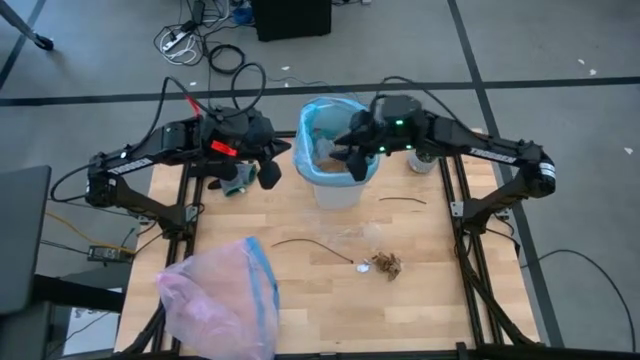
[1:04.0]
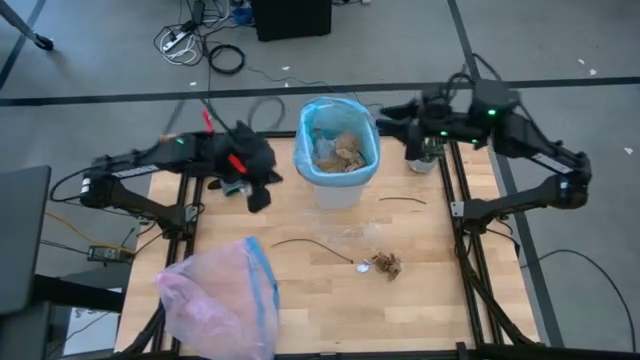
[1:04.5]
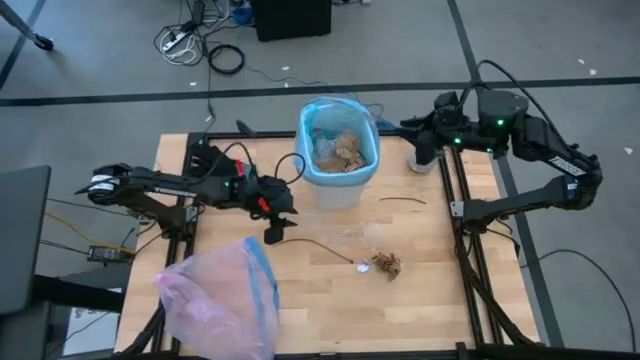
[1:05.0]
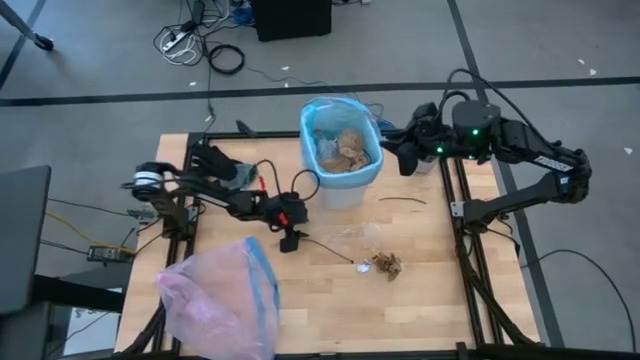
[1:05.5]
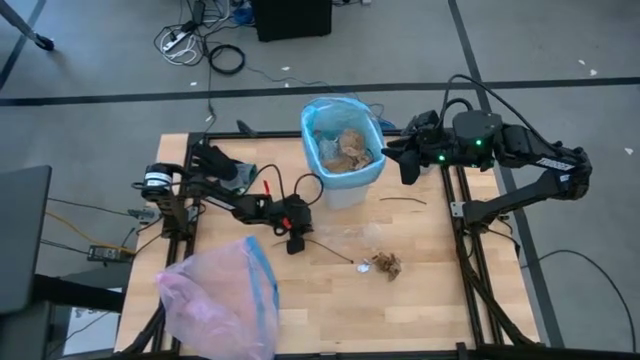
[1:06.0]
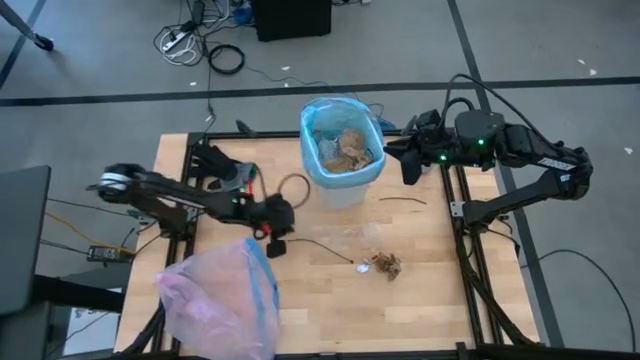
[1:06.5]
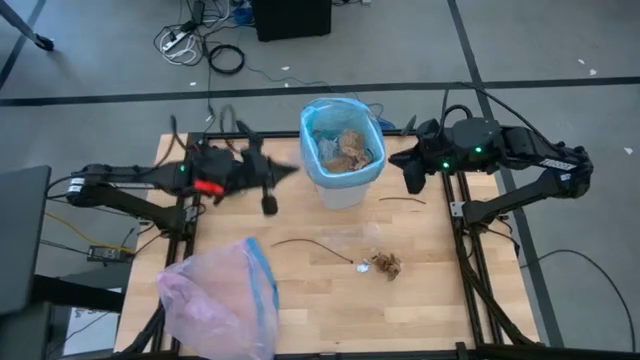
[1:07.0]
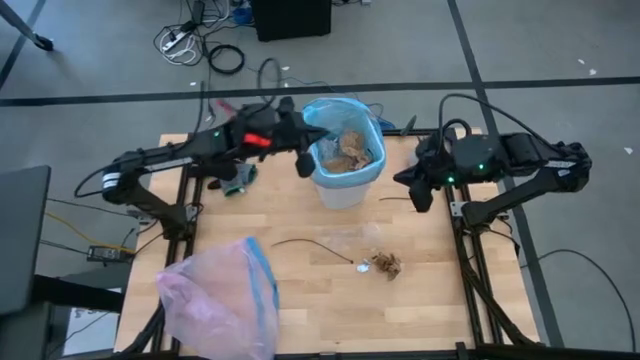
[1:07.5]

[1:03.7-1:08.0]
Task: place trash/remove bag and relplace
Put the transparent plastic into the trash bin

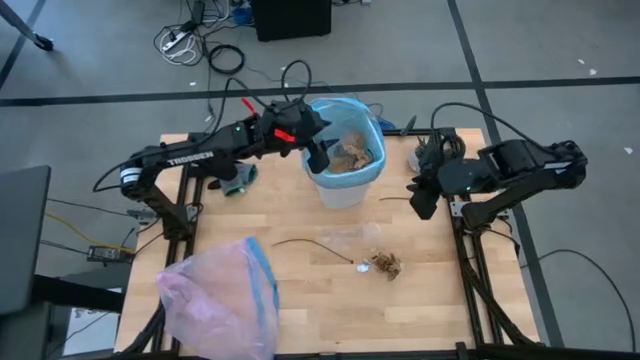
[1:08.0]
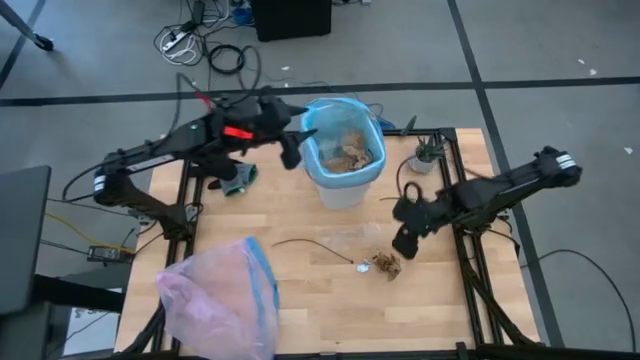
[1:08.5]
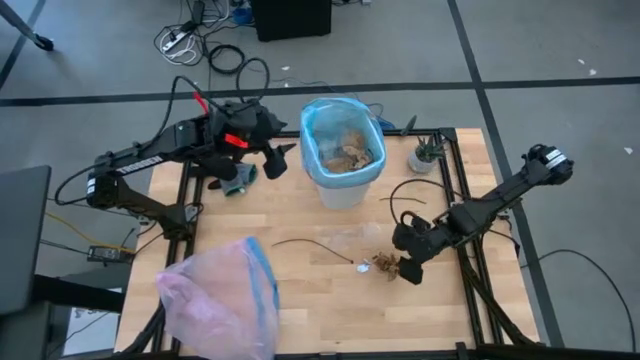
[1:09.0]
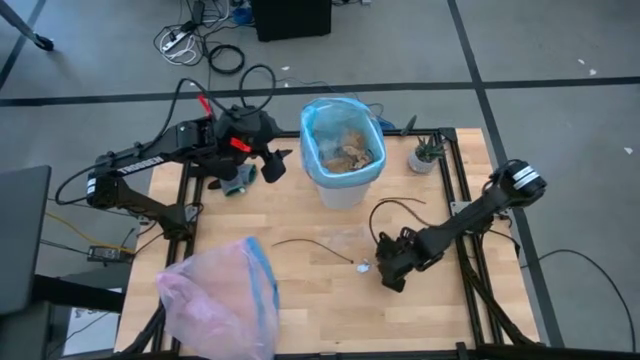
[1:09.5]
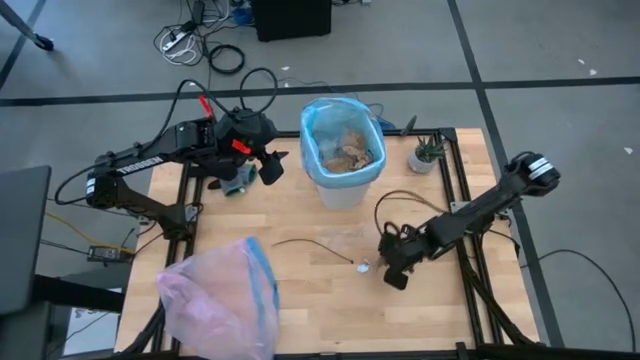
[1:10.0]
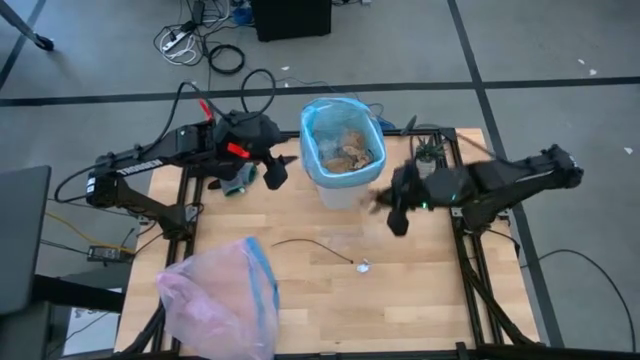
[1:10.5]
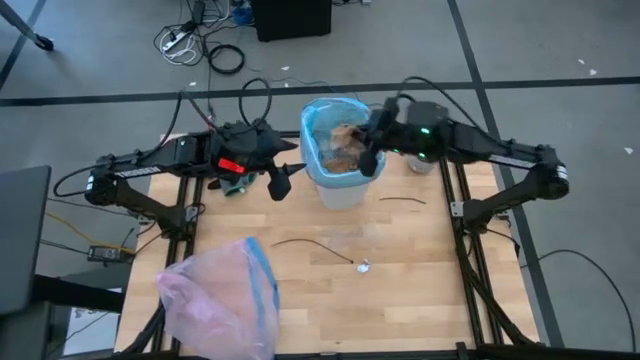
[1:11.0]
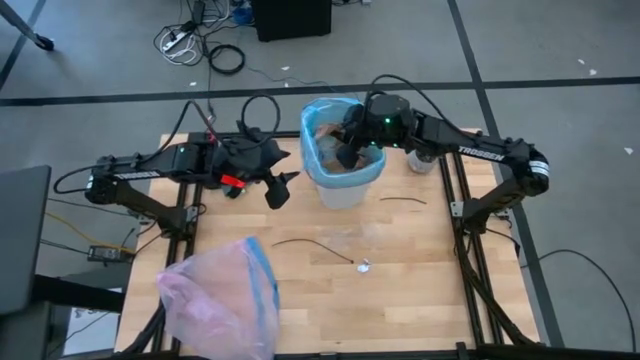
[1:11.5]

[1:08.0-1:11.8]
Put the brown paper into the trash bin

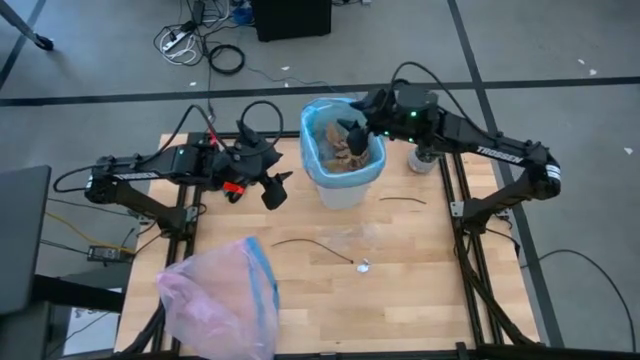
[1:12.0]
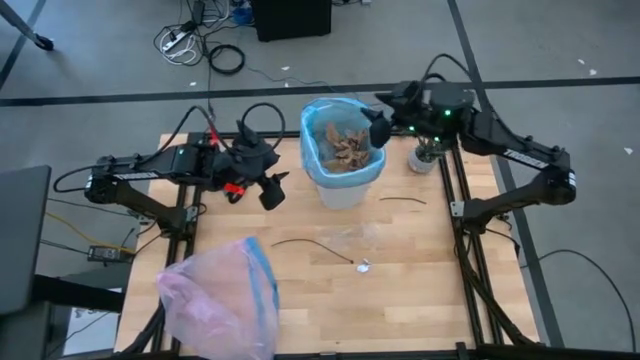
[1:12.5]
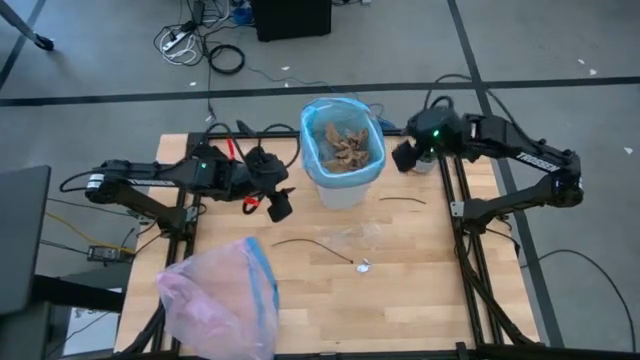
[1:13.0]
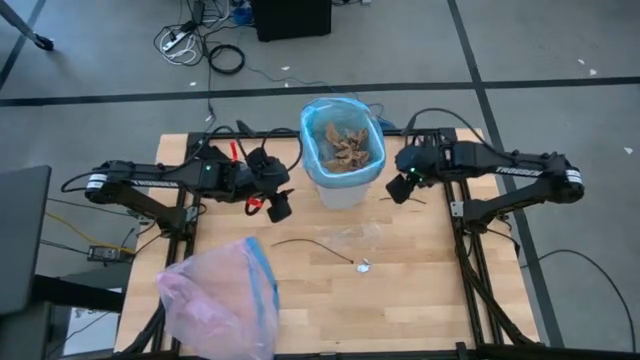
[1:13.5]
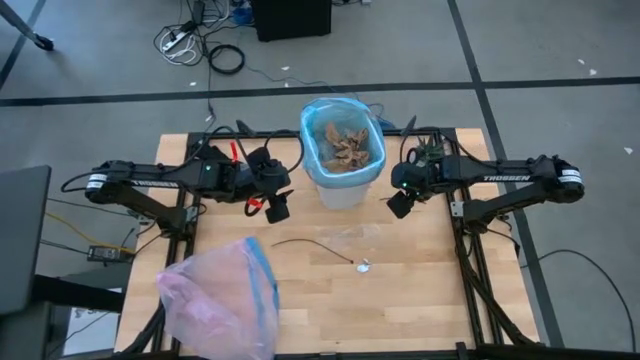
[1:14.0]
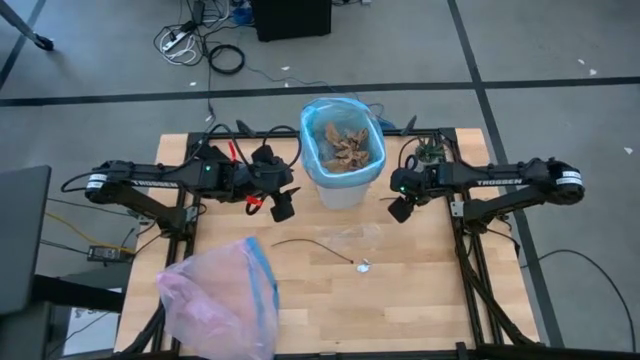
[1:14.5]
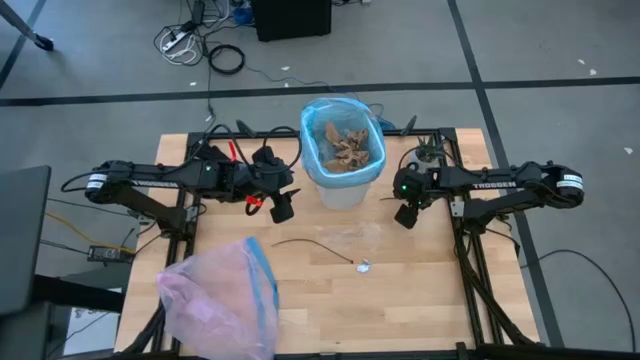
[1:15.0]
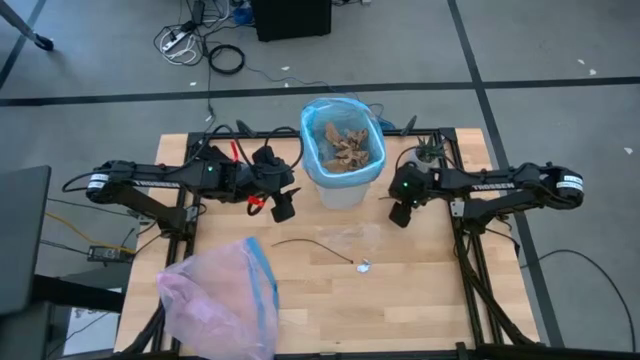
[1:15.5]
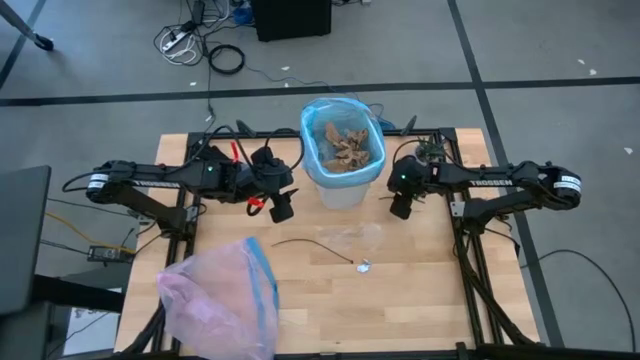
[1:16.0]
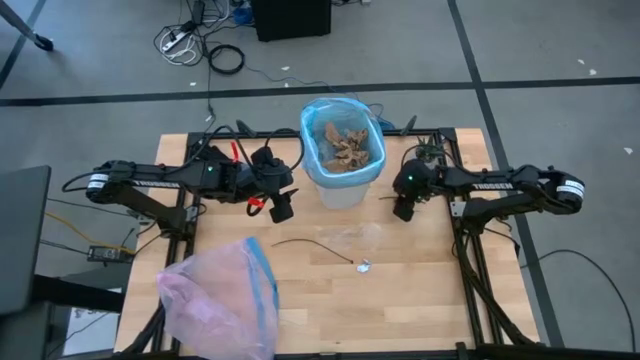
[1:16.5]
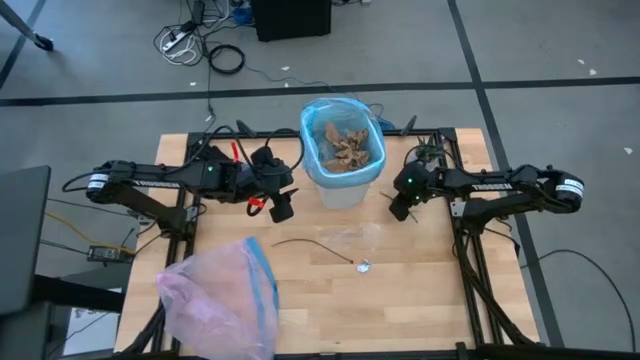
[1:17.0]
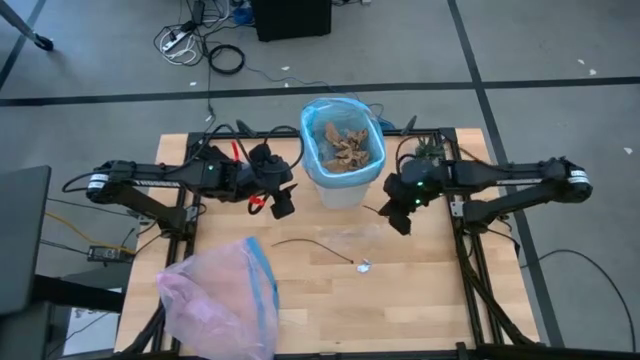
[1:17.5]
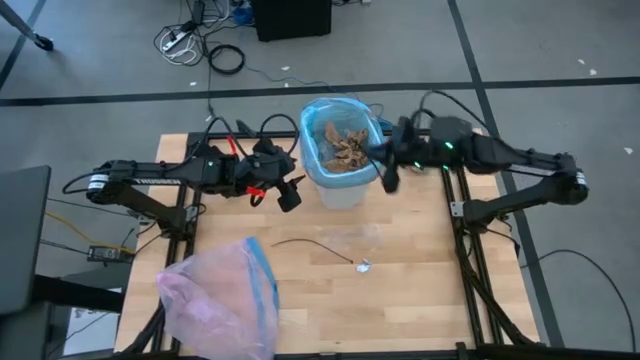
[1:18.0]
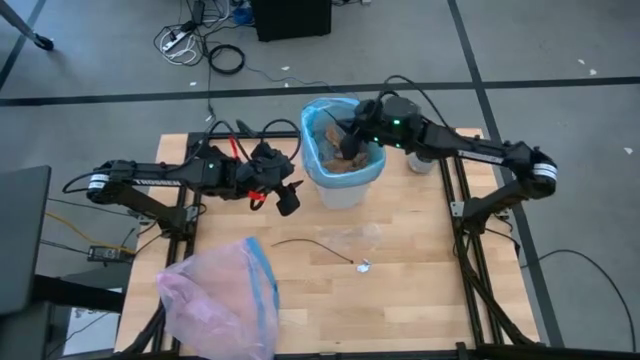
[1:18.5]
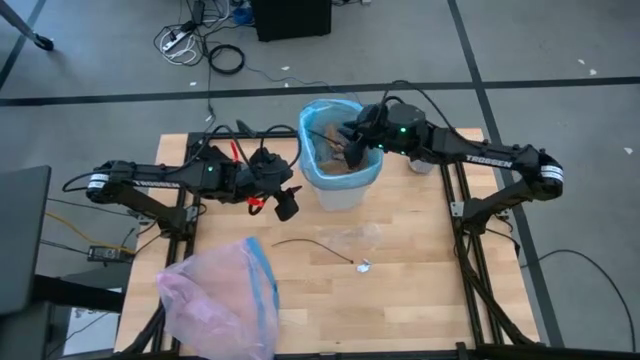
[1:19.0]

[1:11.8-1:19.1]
Put the cable tie into the trash bin

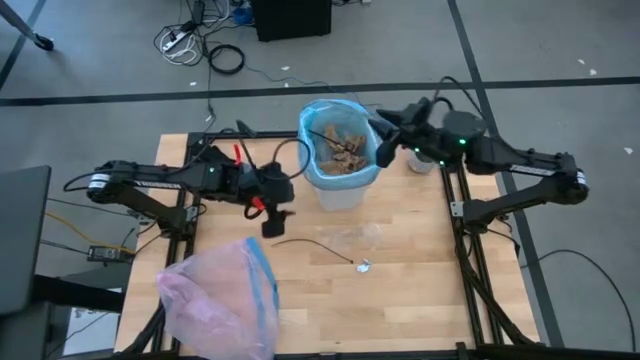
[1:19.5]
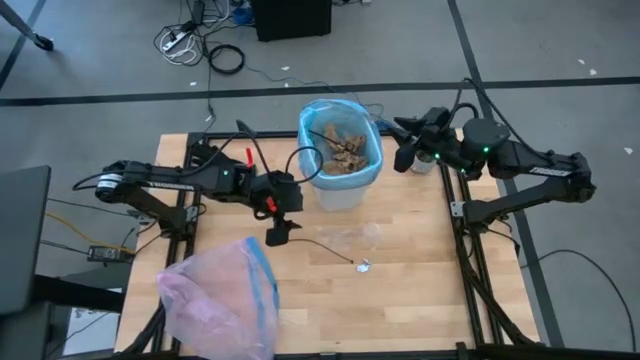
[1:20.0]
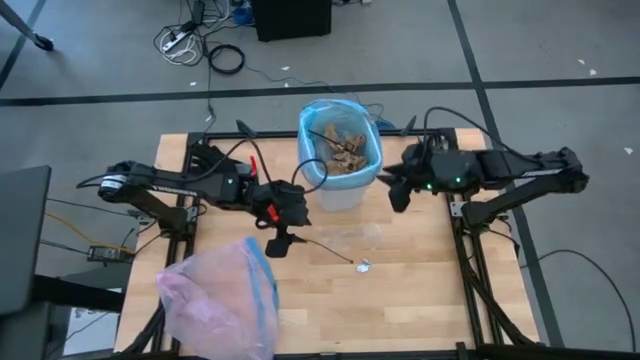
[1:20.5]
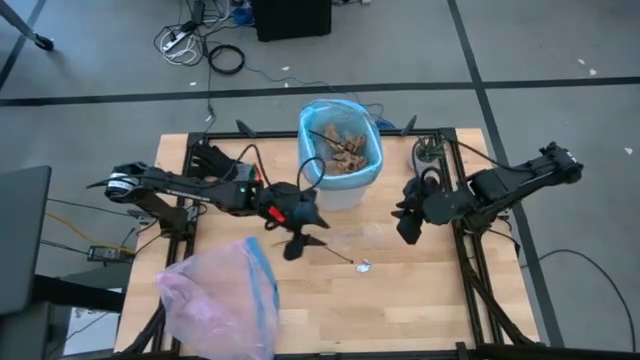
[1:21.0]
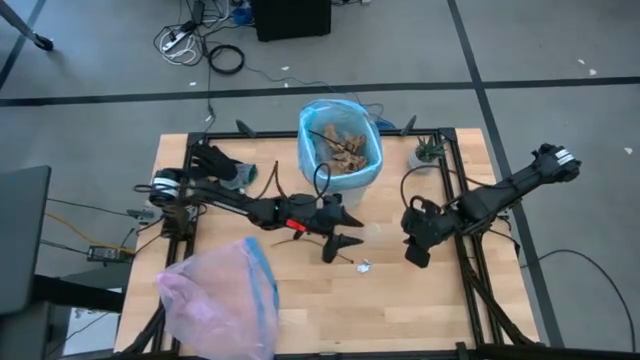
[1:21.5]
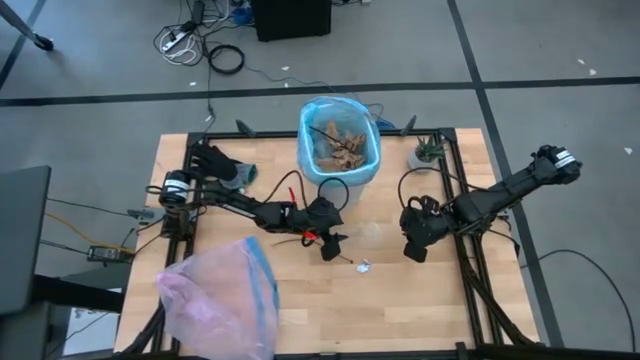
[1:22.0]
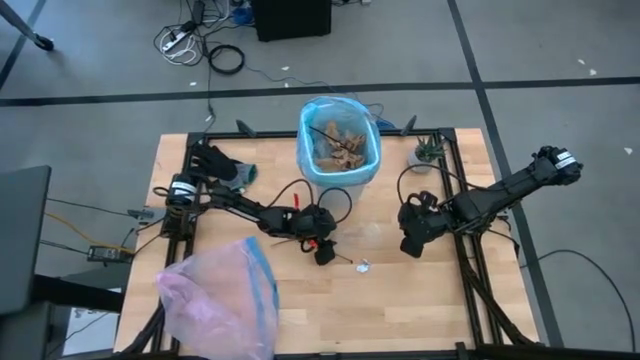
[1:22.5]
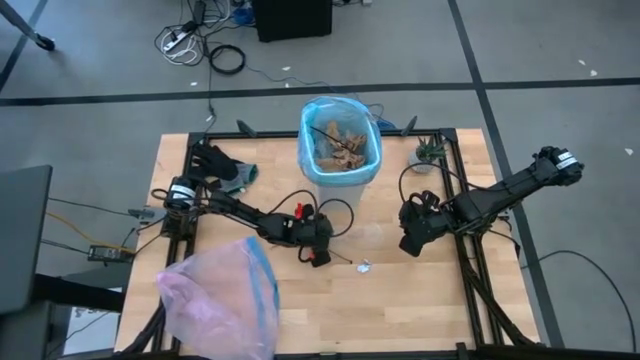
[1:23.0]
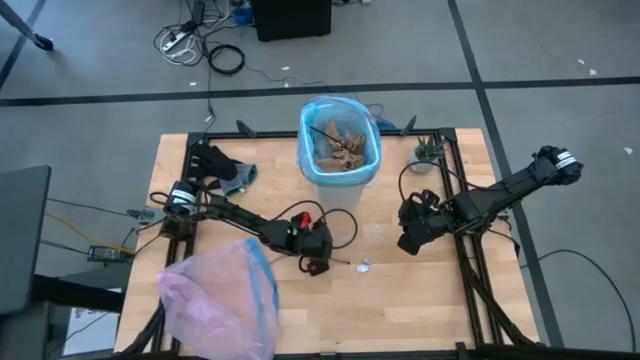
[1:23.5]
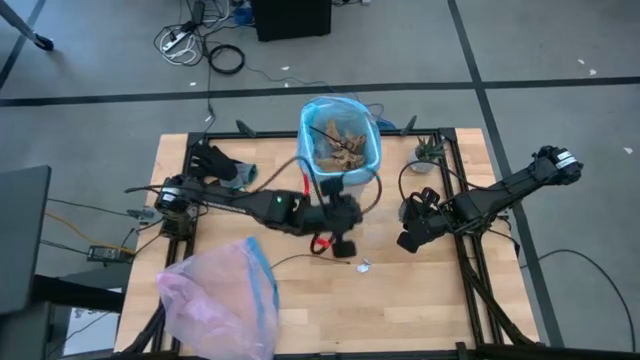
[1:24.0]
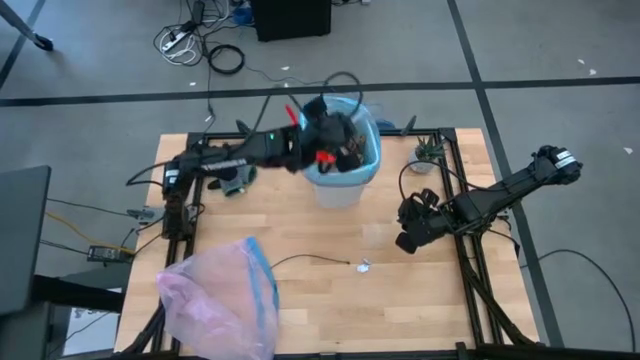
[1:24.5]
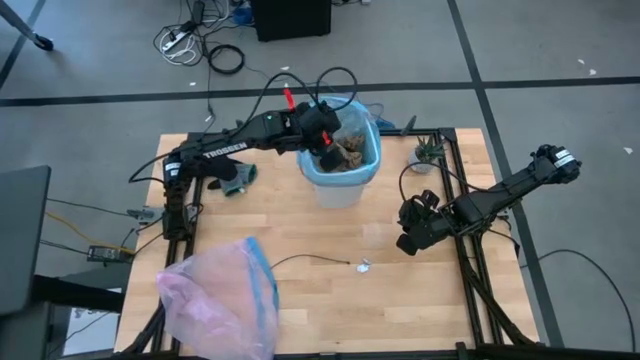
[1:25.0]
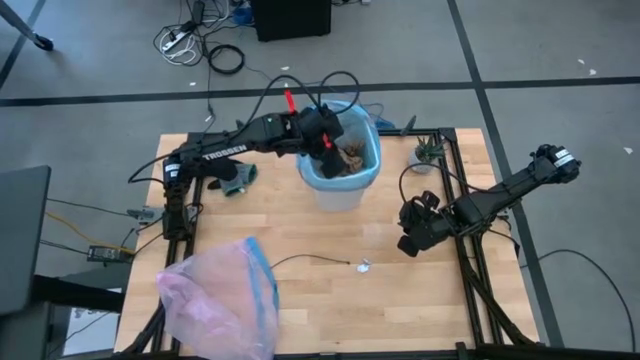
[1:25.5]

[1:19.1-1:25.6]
Put the transparent plastic into the trash bin
